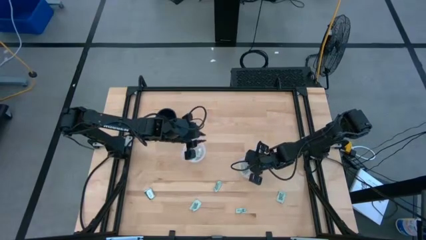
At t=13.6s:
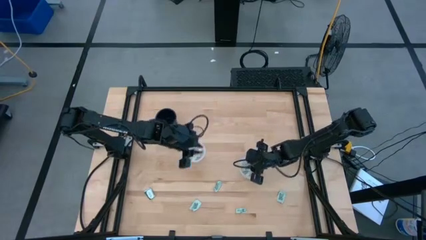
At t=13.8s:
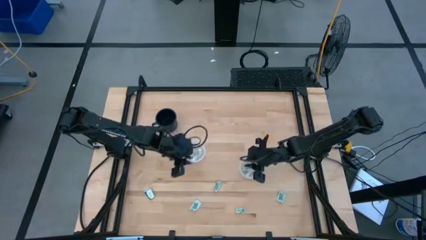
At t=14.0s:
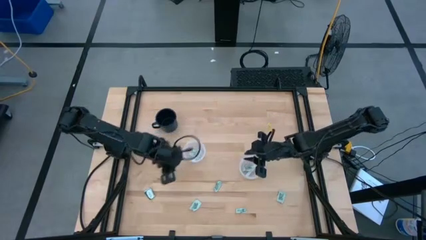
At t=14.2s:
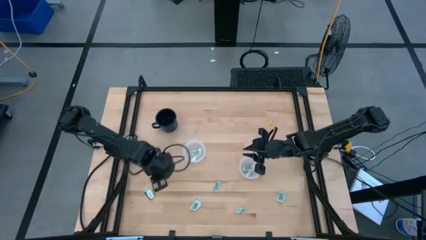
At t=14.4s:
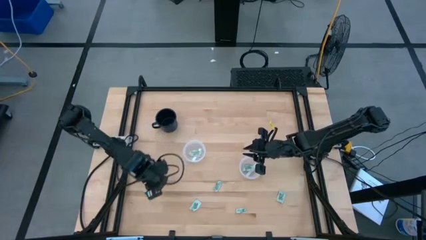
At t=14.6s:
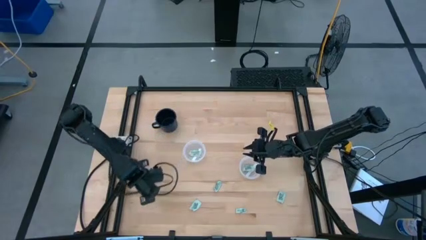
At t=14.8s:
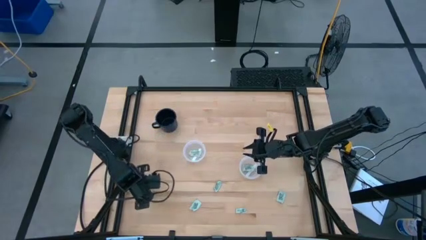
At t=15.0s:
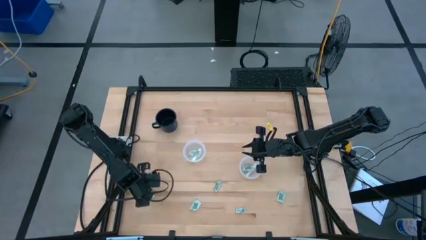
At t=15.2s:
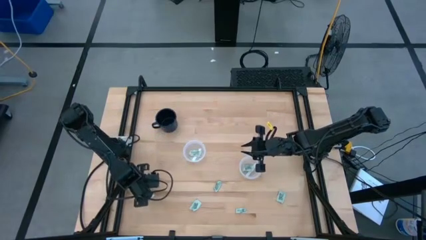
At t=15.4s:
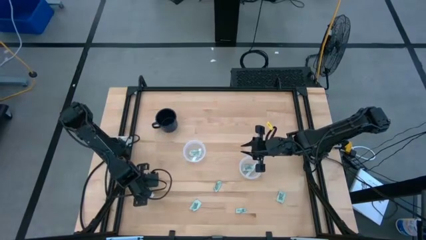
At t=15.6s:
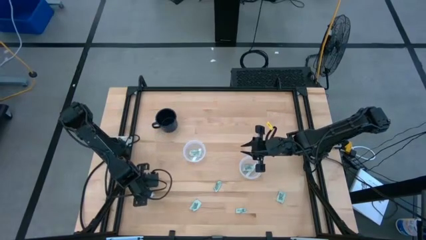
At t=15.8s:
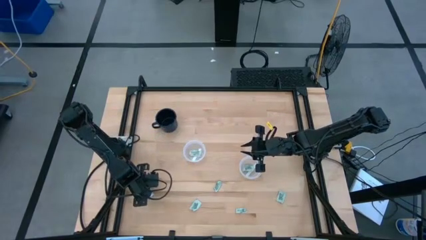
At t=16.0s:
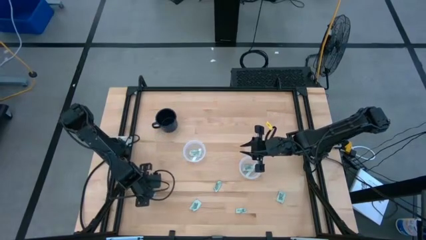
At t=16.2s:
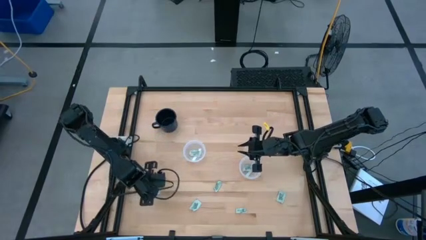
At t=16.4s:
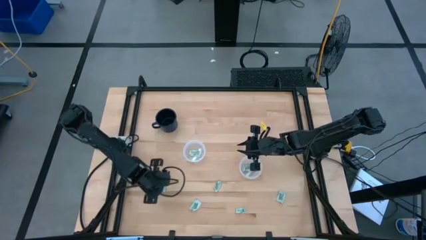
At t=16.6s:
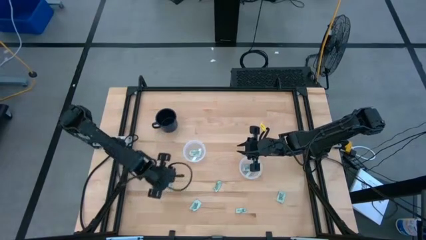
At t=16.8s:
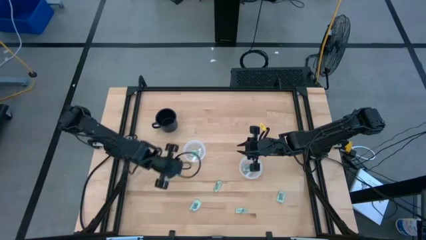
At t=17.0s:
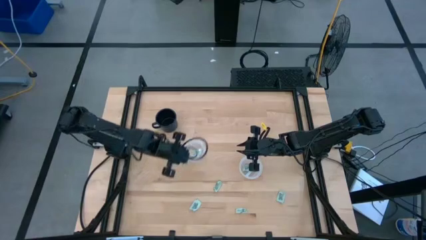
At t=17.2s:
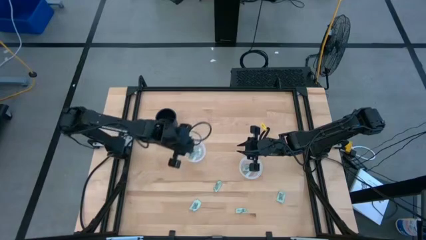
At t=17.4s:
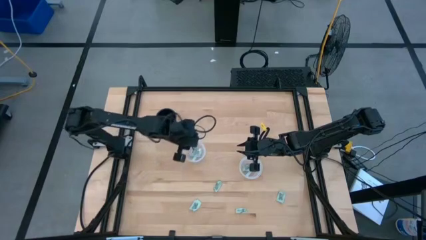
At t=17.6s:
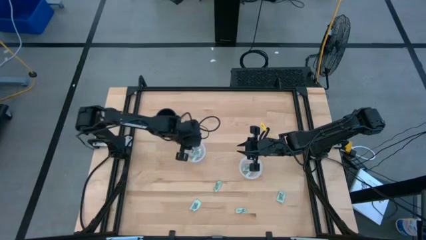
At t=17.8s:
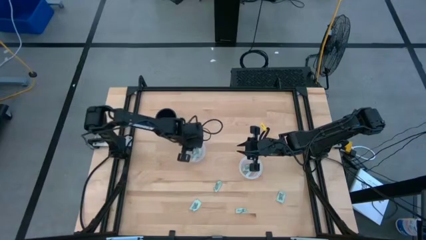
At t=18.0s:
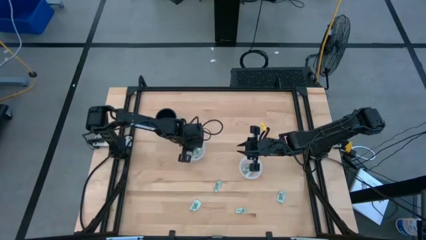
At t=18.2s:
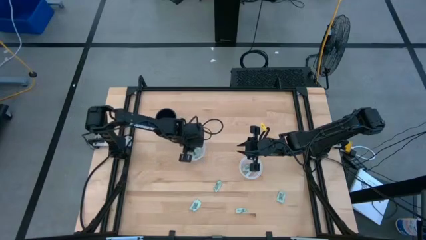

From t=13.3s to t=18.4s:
Task: Pick and place Stevia / Truvia into bins
Put the dark green truvia packet into the left transparent container

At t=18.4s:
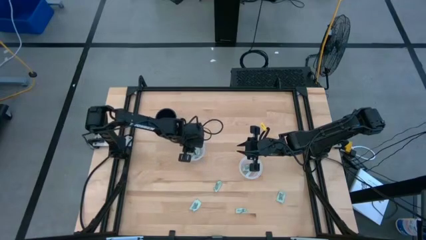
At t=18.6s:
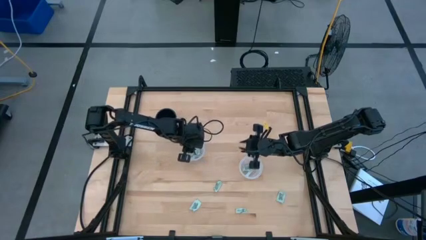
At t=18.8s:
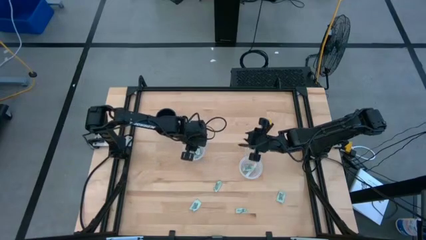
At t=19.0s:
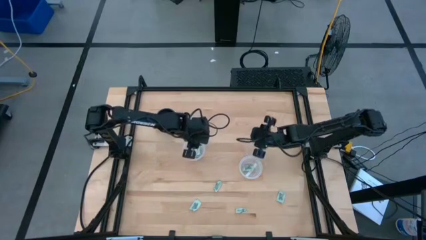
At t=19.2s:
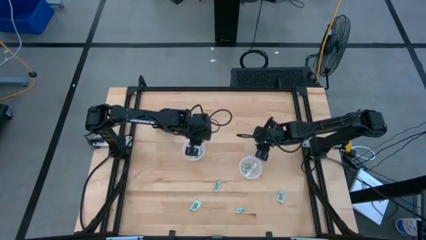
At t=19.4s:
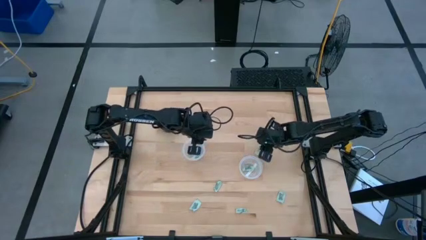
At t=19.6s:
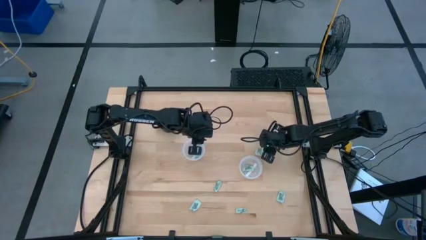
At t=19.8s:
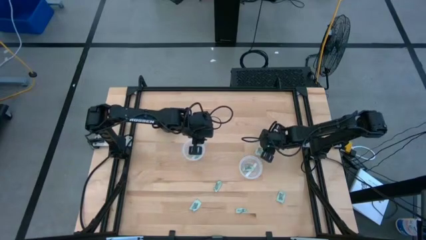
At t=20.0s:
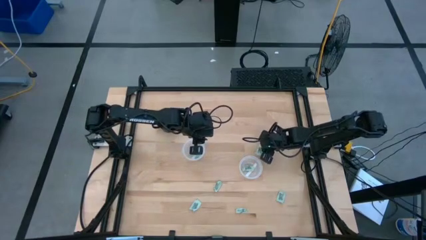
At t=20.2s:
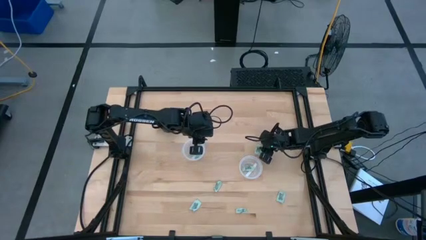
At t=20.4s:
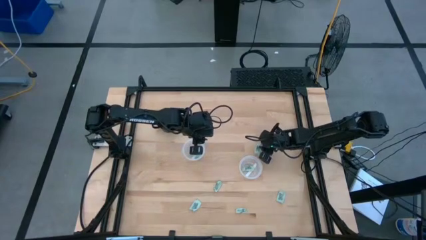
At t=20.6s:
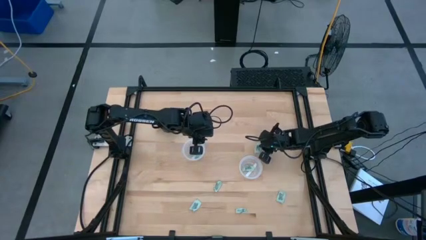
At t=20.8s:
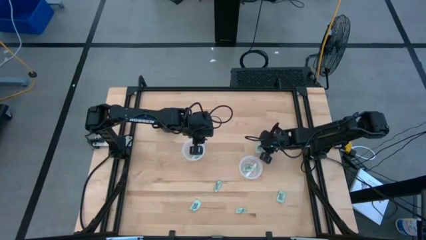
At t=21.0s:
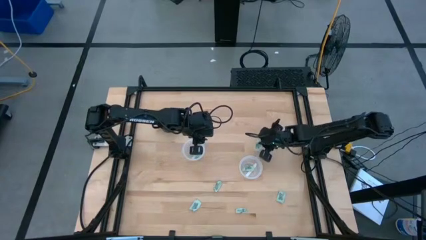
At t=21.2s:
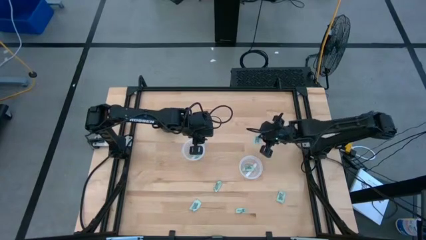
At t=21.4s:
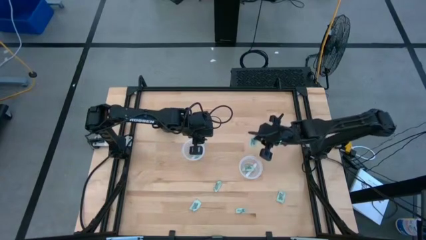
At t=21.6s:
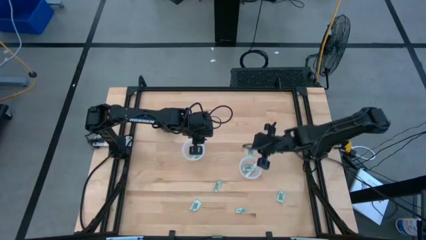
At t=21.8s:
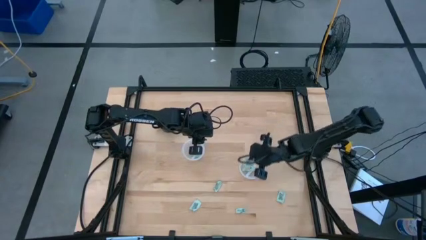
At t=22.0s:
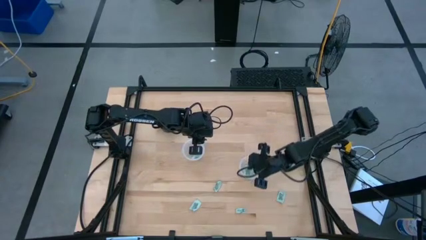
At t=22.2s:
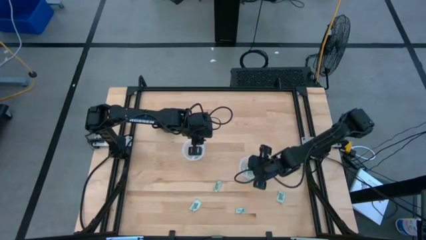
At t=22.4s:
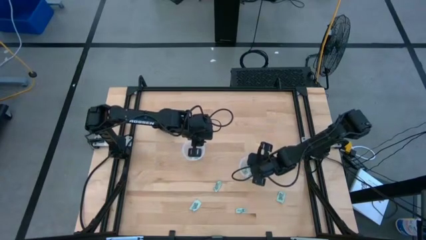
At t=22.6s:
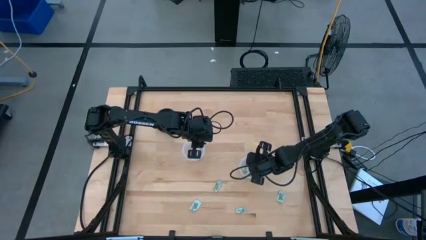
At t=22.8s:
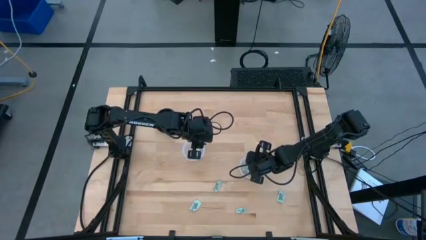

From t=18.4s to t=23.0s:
Put the green stevia packet into the right transparent container

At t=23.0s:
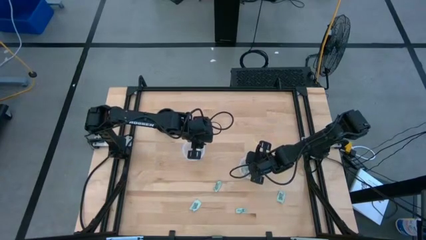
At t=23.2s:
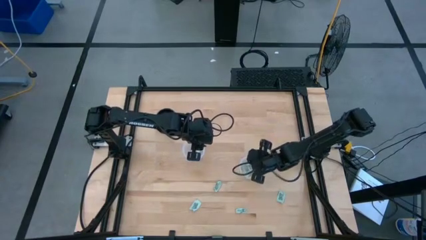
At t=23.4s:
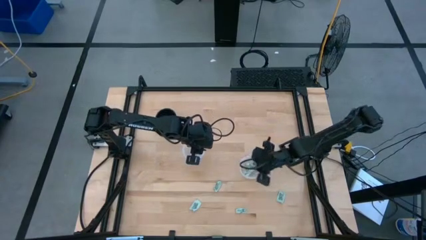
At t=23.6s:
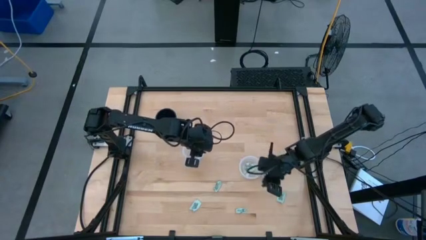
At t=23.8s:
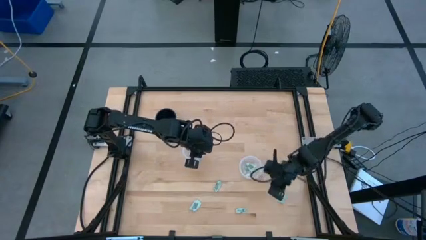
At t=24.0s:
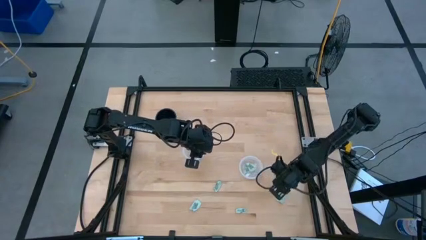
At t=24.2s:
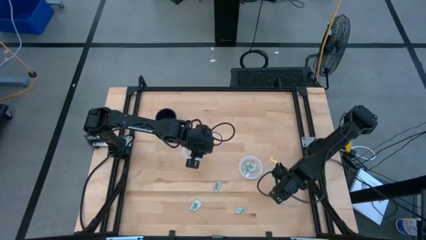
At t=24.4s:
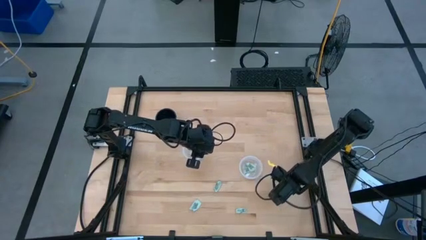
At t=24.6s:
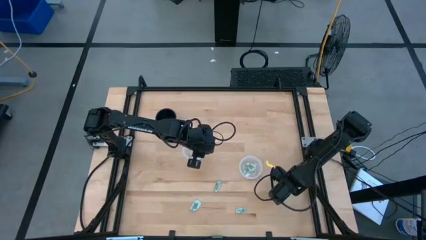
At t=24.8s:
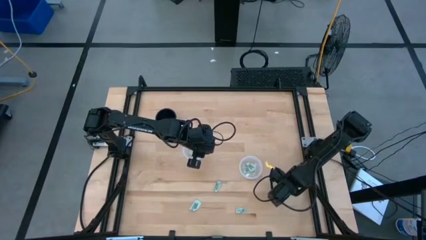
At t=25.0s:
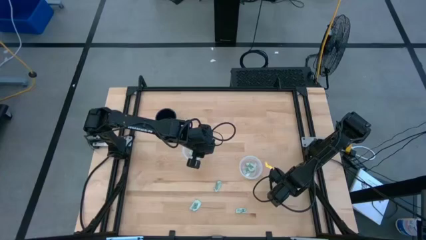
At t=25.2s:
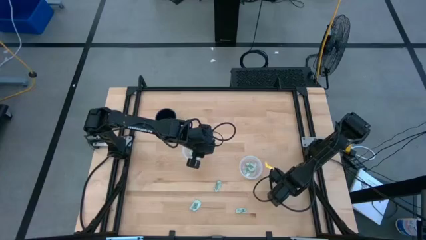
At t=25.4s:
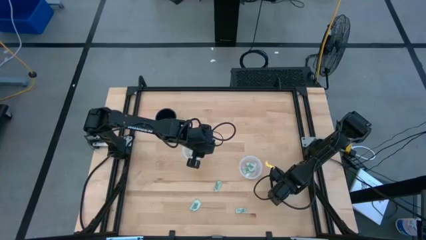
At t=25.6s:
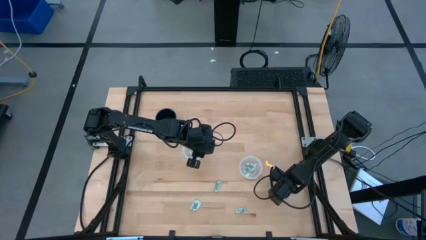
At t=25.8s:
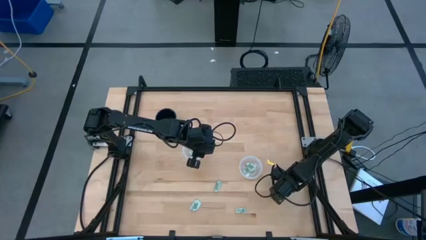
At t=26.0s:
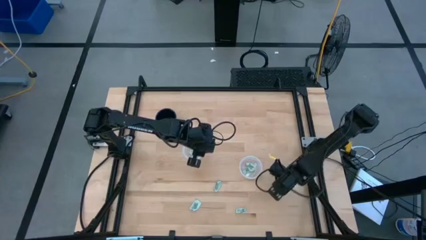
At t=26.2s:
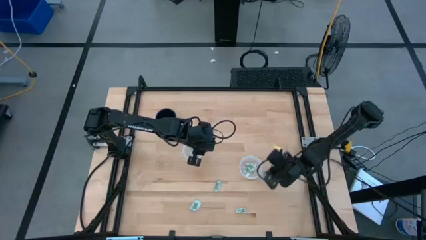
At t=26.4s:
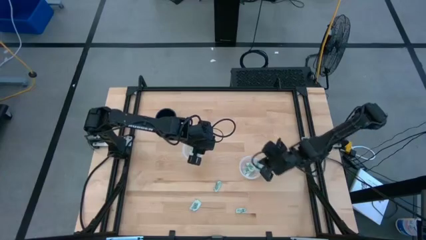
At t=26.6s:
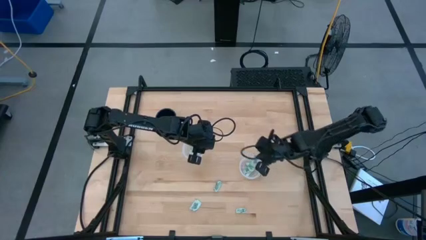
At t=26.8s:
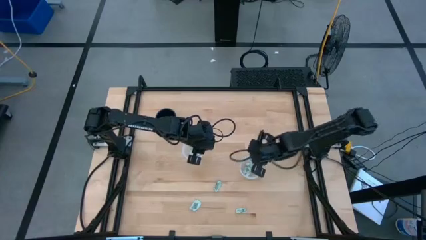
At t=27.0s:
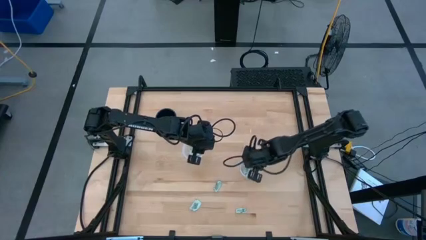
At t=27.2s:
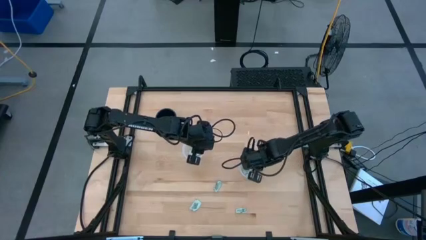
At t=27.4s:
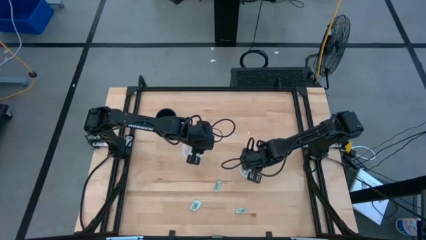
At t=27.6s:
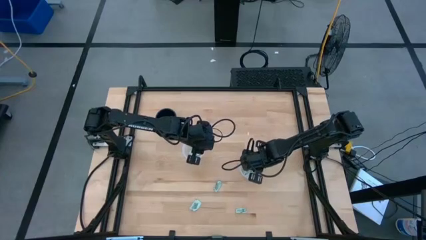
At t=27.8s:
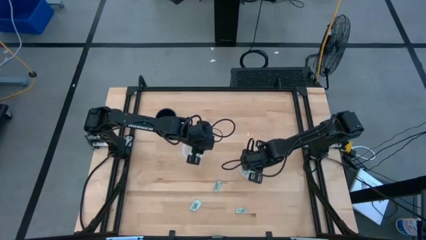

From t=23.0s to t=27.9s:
Put the green stevia packet into the right transparent container

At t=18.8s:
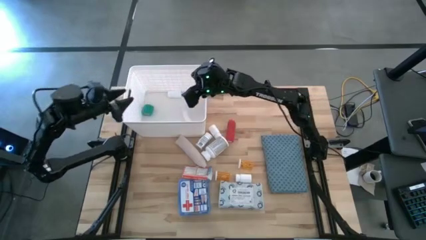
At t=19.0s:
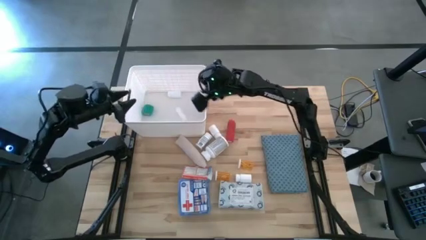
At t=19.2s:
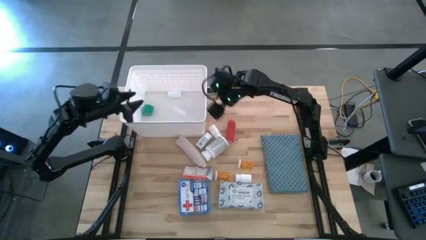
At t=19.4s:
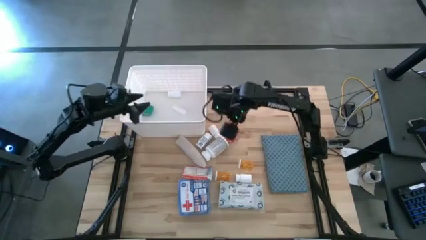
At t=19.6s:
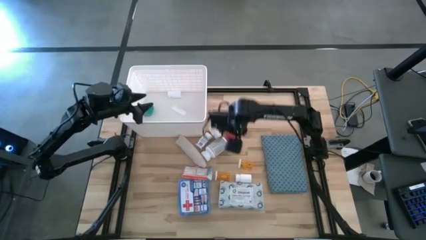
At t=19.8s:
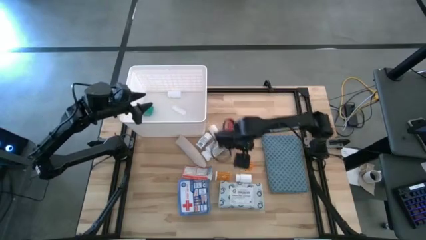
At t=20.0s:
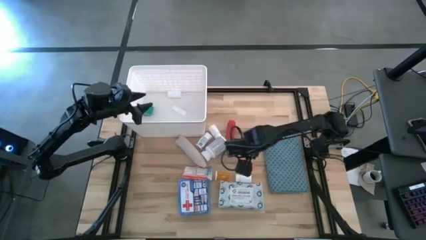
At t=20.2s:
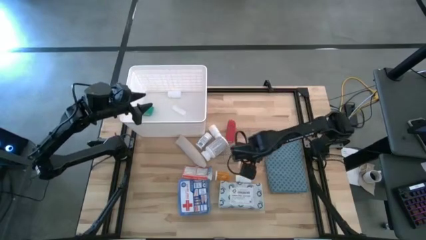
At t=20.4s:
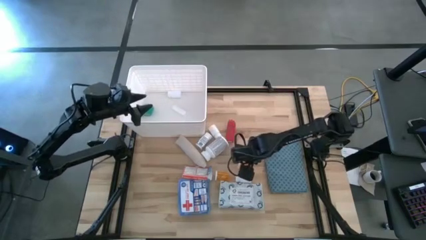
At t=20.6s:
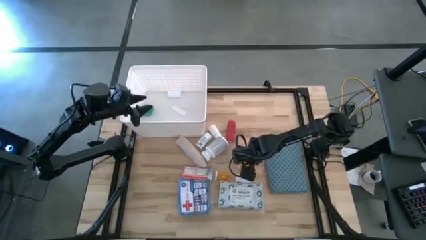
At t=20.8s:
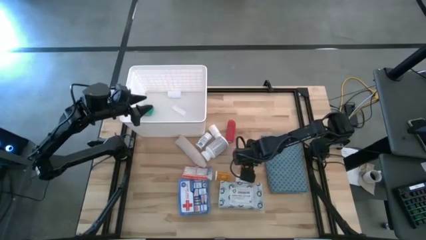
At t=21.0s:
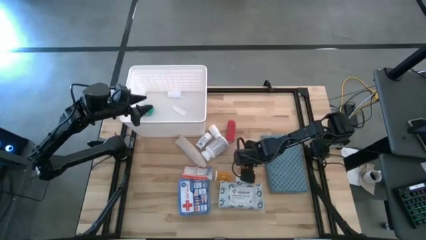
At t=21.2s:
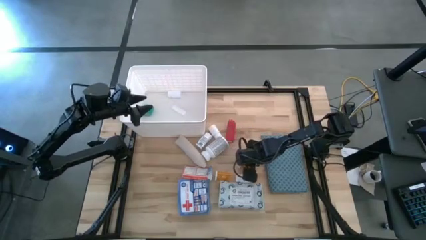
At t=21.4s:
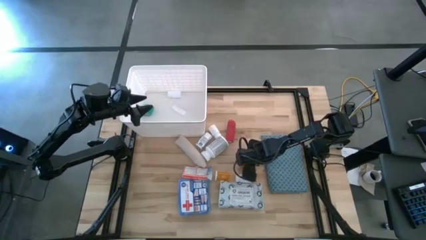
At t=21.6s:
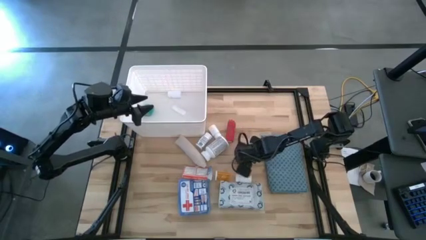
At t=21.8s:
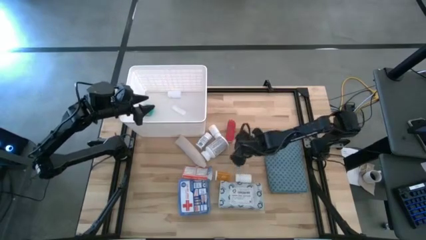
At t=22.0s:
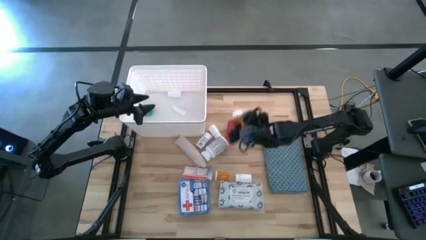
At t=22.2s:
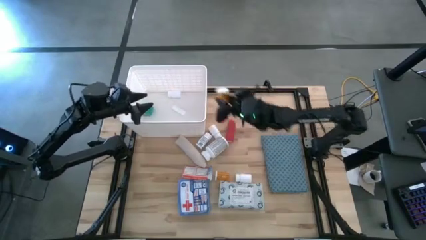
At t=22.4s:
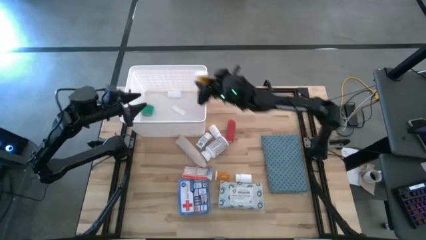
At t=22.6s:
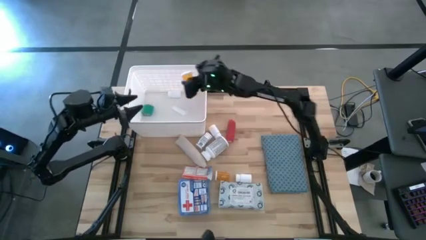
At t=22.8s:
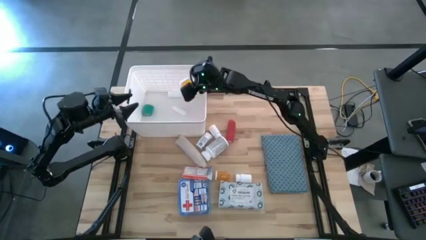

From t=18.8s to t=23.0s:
Task: Pick & place medical supplies in basket/bin
Put the right orange capsule bottle into the white bin
